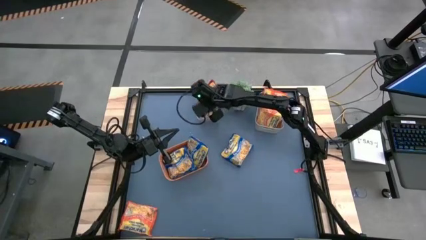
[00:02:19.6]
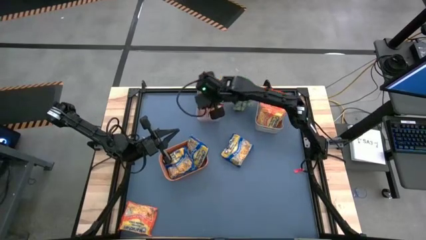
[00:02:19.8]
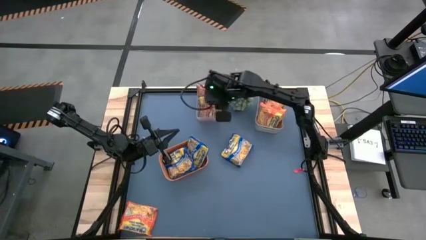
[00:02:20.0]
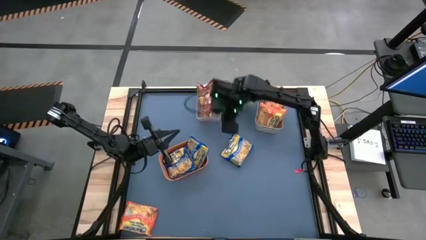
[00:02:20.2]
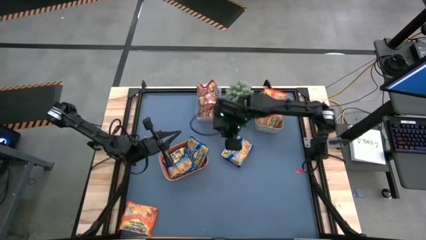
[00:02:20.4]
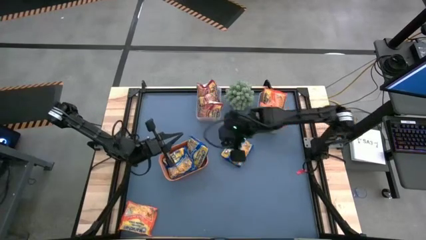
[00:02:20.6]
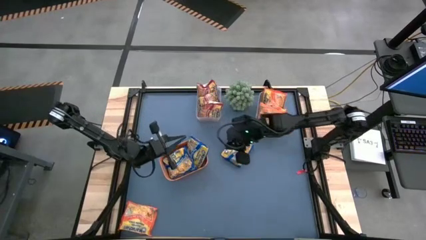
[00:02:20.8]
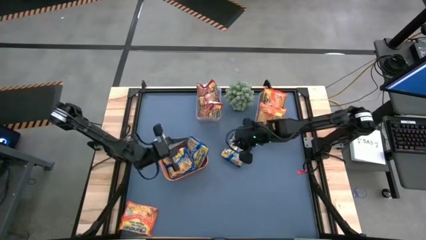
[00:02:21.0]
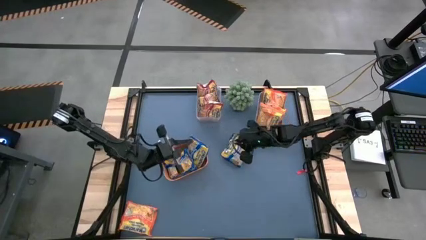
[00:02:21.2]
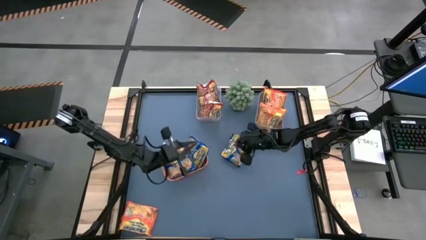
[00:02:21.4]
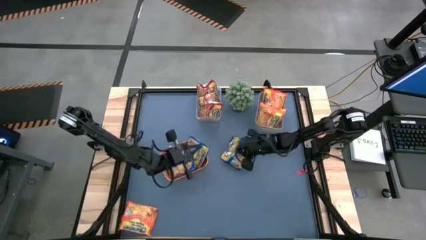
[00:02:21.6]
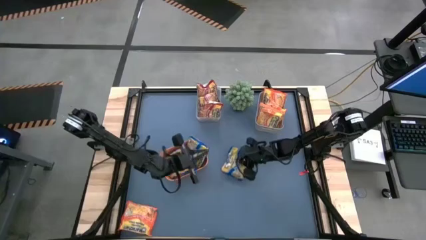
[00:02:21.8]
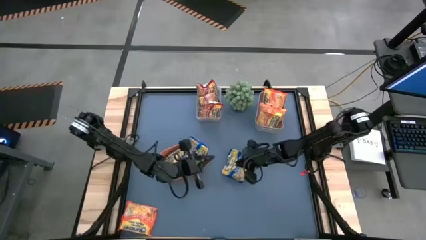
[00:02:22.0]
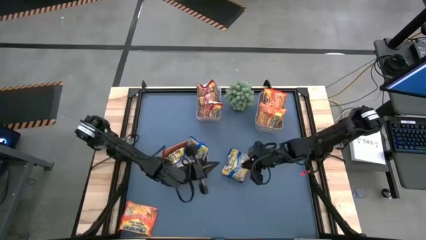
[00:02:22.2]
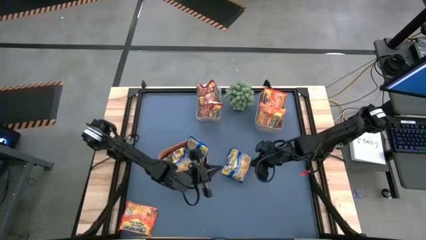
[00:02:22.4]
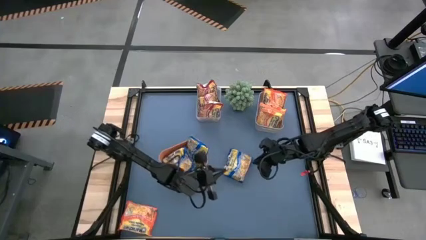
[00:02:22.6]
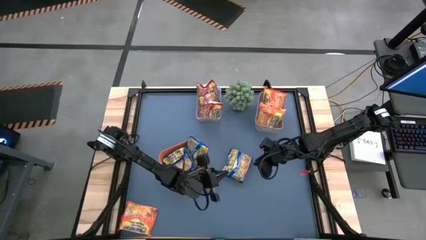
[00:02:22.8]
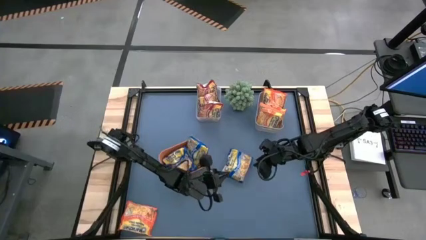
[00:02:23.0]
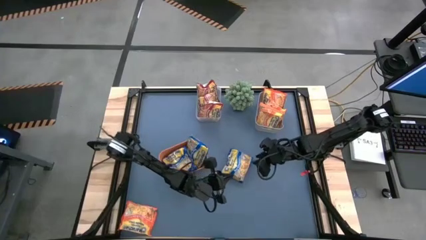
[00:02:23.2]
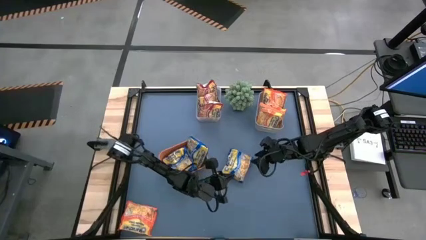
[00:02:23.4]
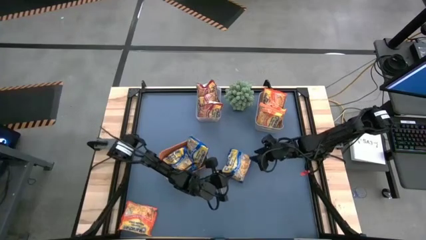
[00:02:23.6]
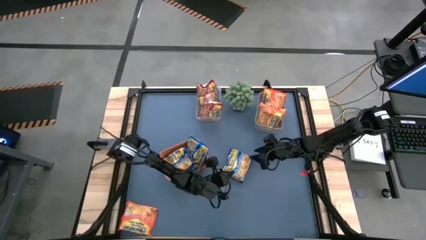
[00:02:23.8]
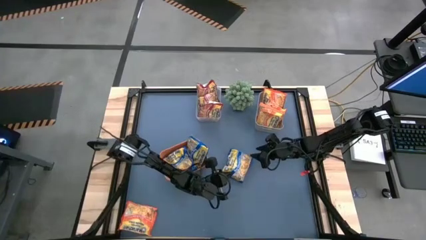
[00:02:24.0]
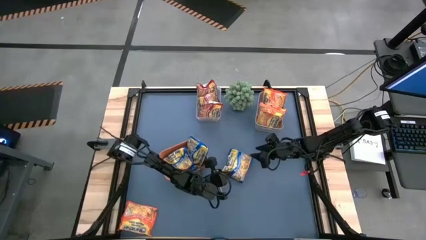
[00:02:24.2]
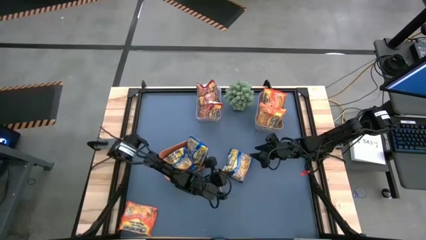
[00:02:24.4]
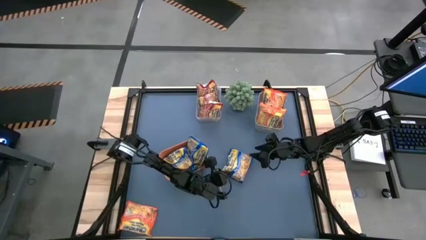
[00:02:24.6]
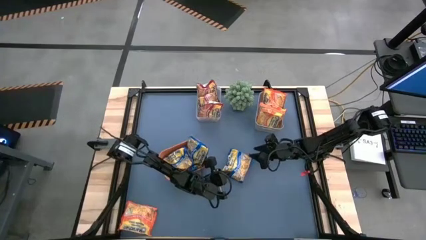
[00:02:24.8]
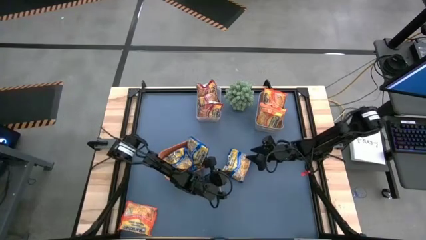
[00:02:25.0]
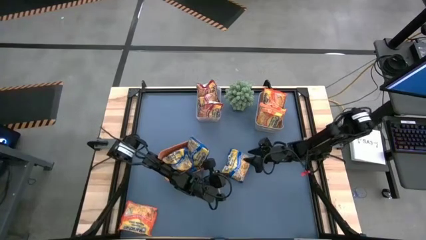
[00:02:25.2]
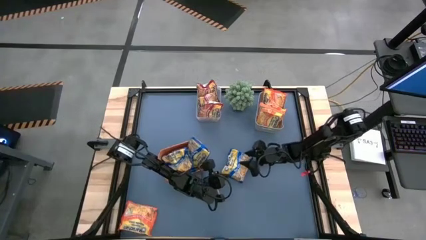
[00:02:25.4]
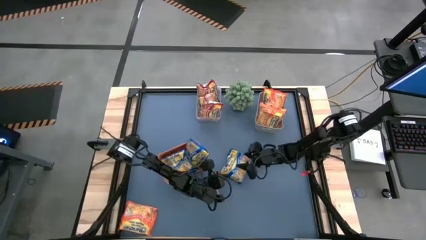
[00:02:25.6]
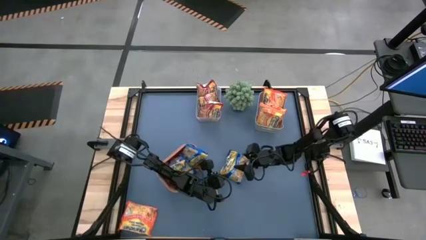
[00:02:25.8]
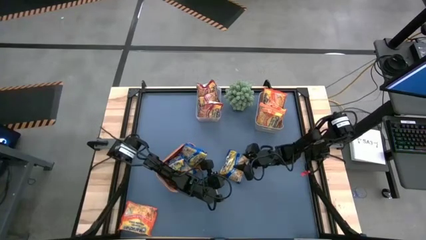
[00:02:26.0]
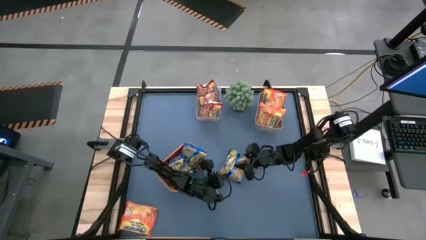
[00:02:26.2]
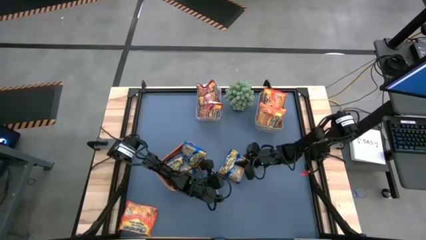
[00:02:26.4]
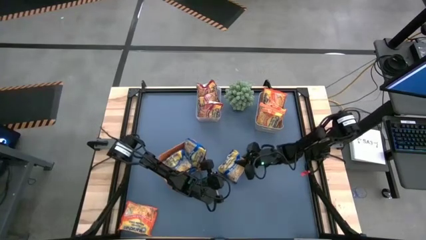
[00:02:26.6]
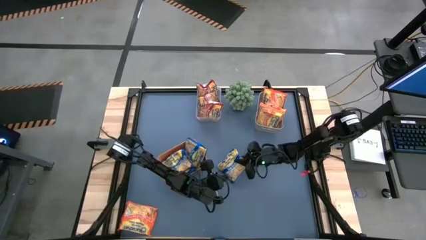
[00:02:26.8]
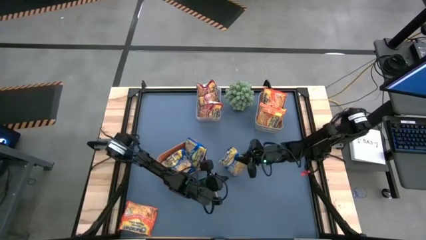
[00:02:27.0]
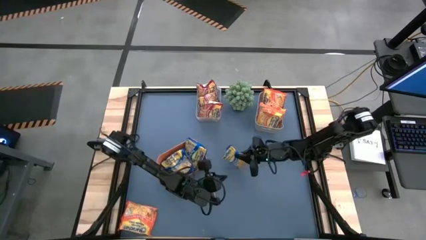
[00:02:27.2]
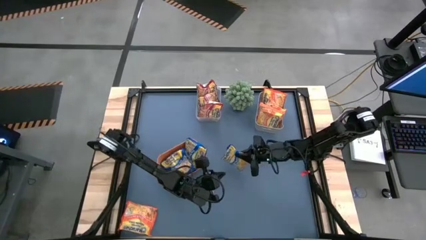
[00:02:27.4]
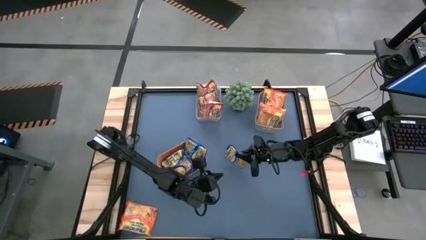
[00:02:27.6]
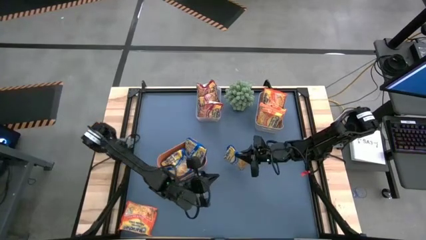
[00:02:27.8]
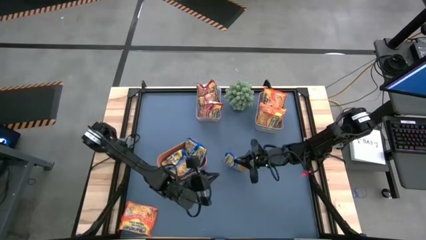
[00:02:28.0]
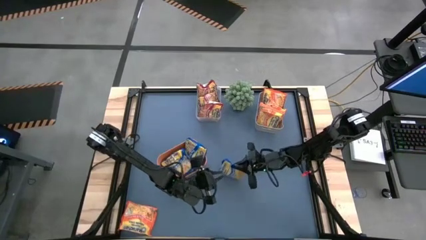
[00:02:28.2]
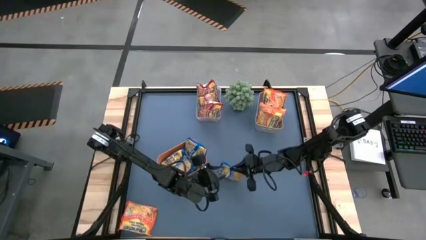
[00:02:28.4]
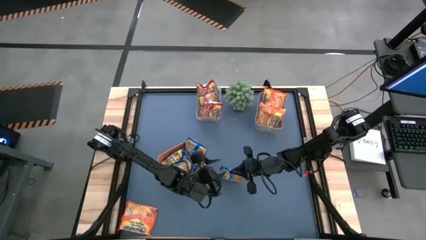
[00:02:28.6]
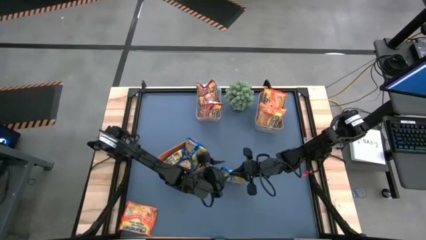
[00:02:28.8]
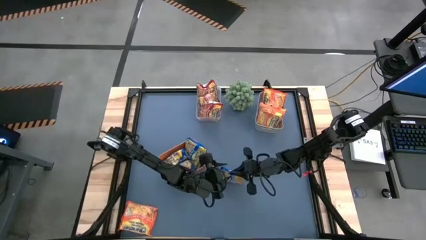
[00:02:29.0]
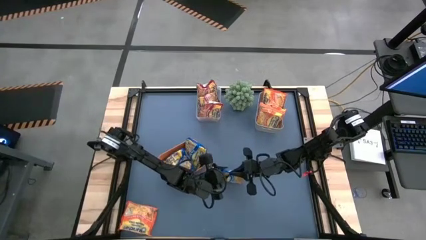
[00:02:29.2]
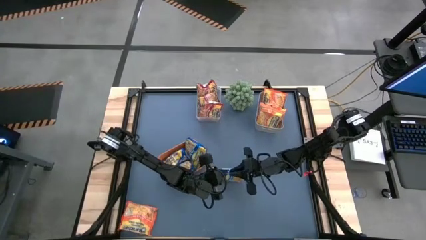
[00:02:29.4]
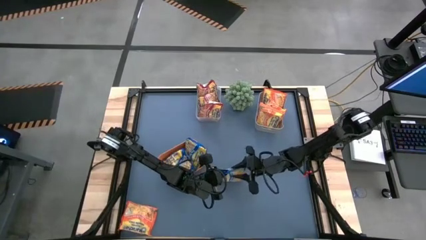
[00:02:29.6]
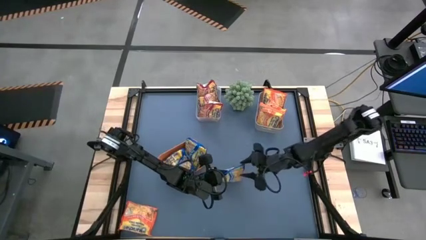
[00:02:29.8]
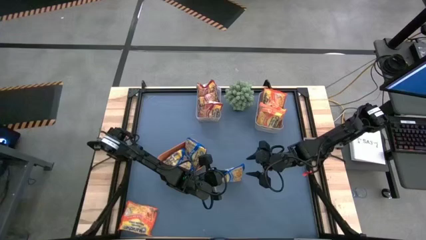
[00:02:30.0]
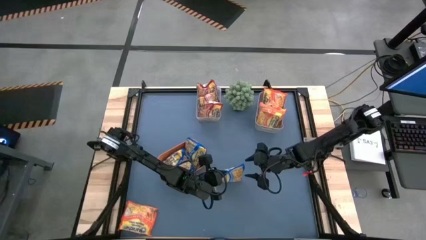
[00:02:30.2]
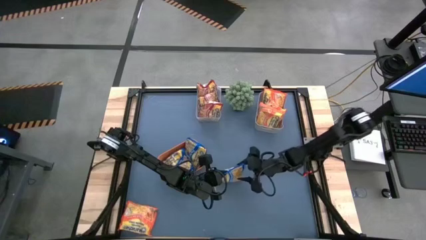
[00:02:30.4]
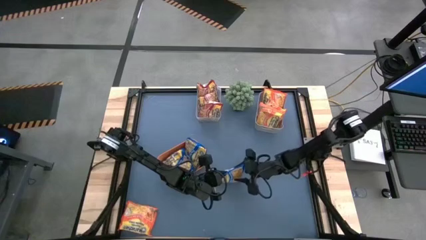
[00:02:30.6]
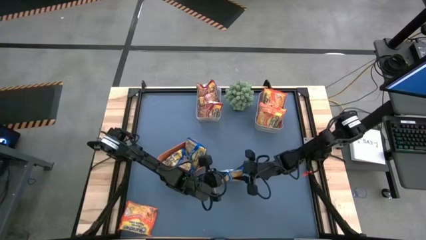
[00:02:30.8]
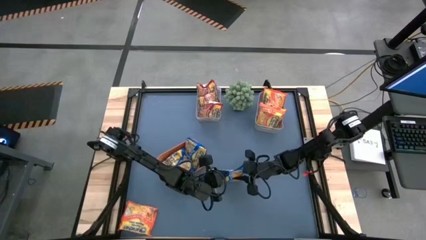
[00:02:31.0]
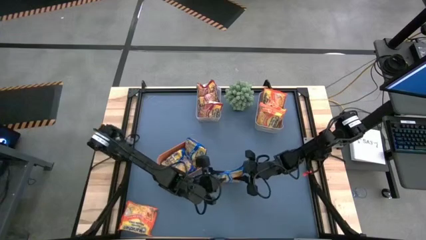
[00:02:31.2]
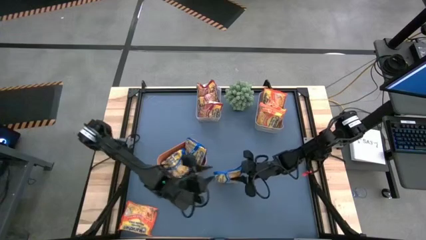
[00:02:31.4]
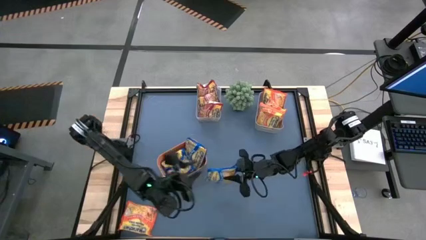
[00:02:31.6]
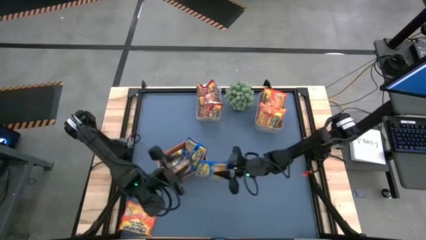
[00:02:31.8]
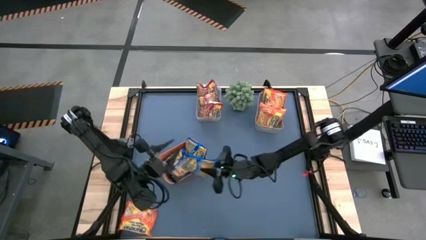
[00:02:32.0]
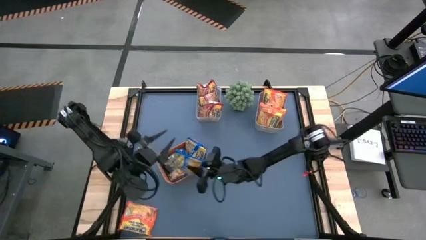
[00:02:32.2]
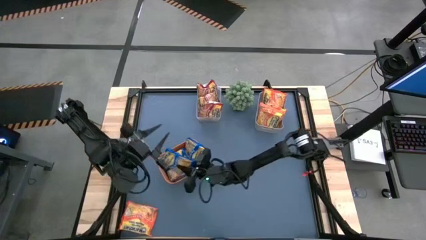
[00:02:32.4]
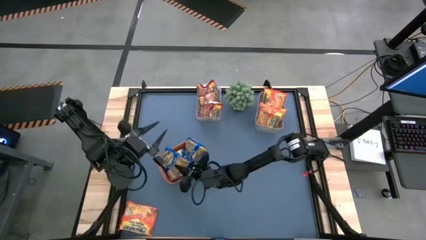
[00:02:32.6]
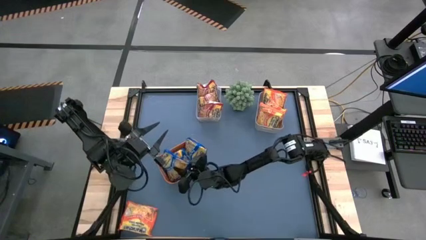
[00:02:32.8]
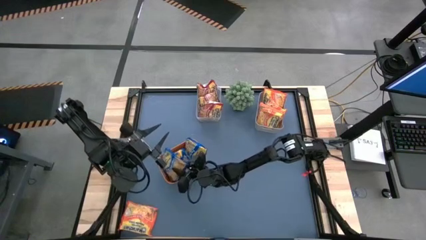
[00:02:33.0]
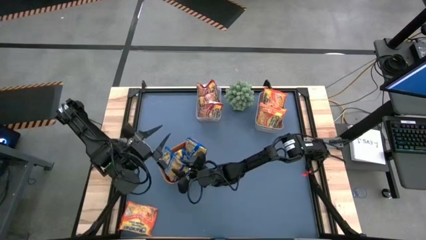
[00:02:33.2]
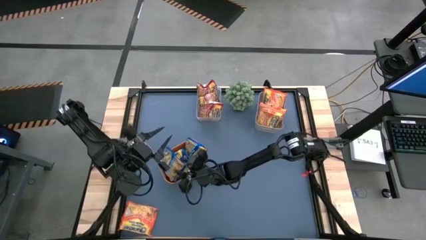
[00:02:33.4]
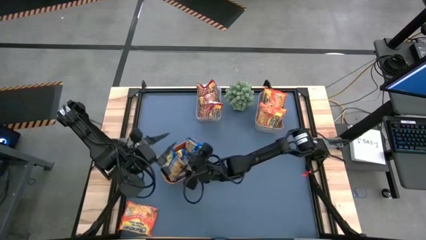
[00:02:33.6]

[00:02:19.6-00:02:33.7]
Task: Sort Maruchan noodles
Put the blue noodle pack into the orange bin

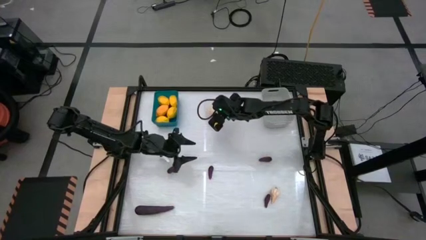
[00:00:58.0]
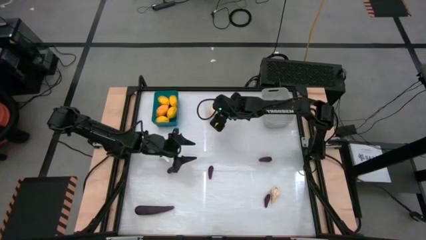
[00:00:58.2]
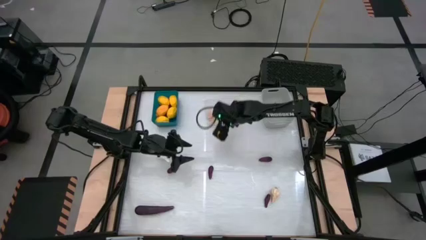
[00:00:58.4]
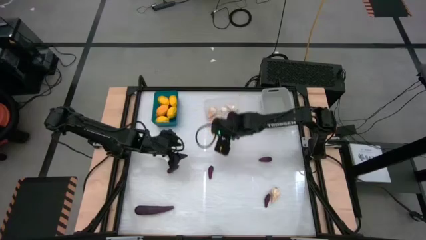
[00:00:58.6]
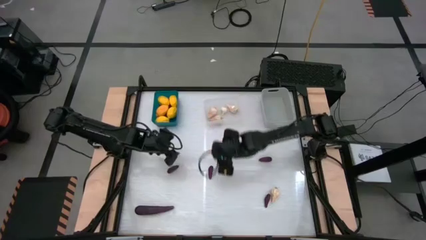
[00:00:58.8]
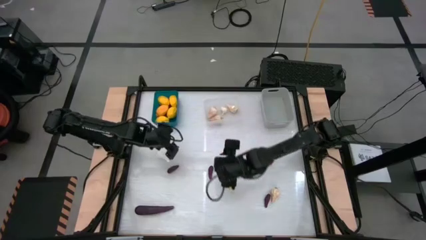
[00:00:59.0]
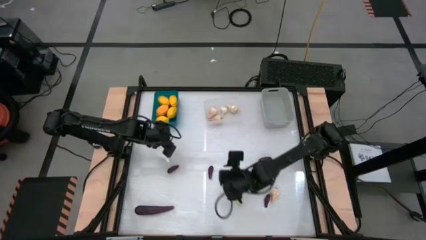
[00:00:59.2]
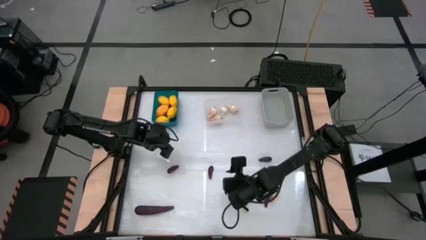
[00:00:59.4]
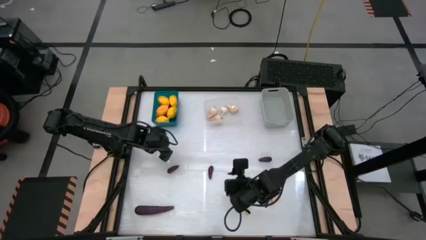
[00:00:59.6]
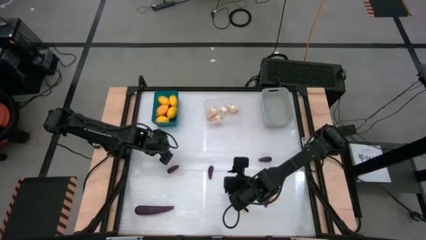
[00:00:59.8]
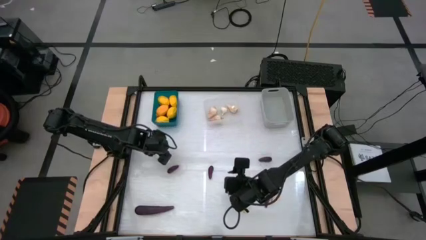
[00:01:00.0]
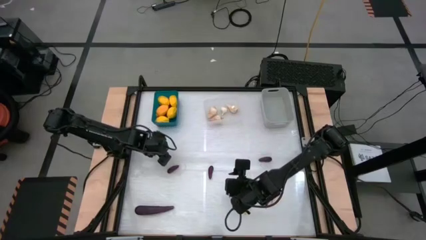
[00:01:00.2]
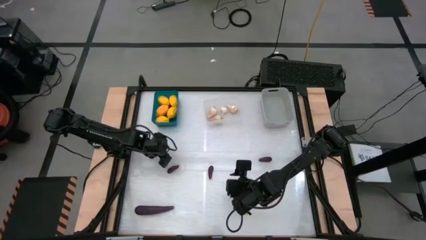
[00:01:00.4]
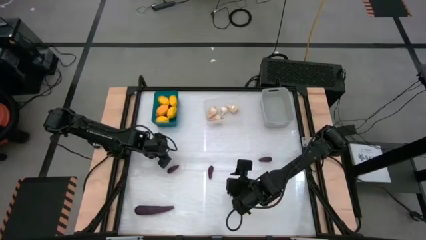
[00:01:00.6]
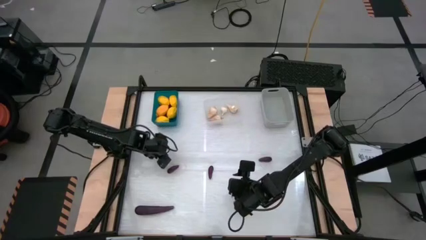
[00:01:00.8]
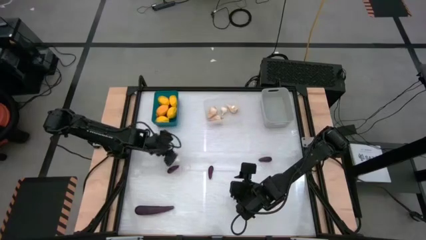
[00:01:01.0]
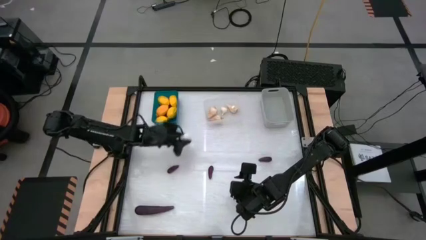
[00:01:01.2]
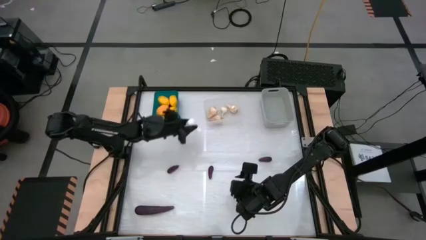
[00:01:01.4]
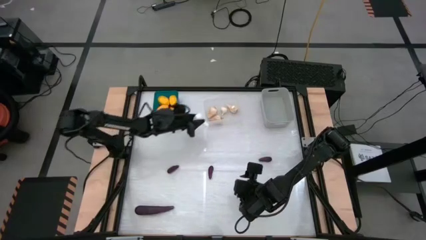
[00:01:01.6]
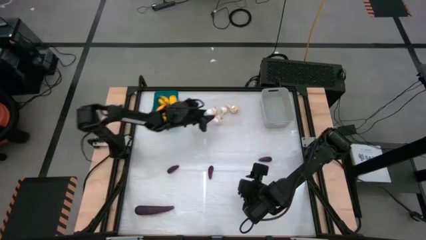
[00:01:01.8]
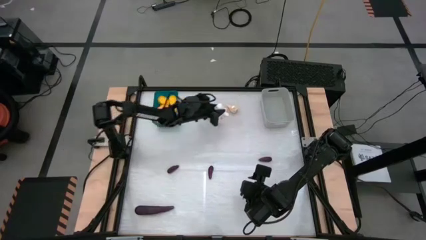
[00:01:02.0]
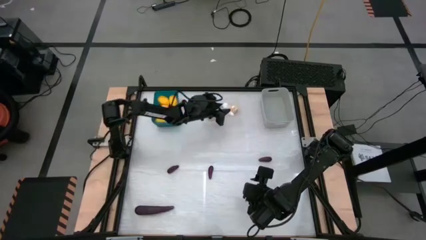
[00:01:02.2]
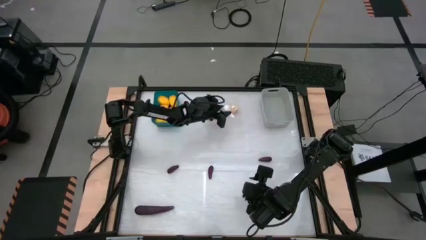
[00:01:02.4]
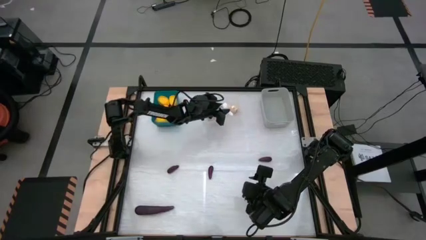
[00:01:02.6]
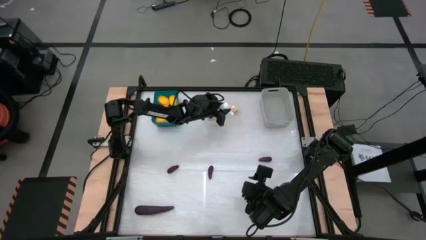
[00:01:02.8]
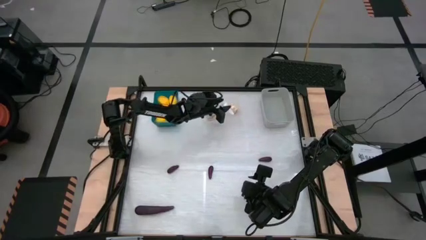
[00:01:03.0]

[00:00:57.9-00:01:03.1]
Task: Sort produce into baskets
Put the garlic into the transparent bin
